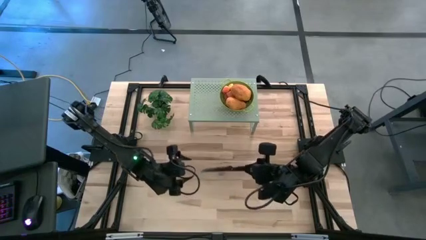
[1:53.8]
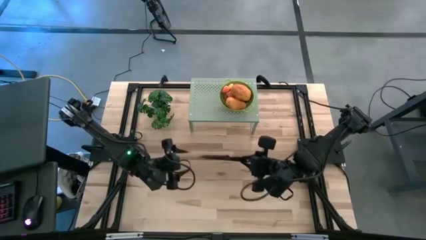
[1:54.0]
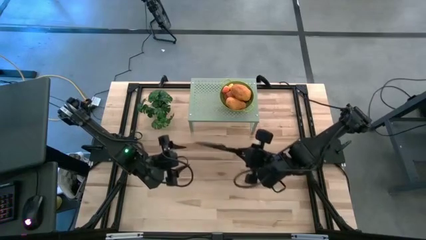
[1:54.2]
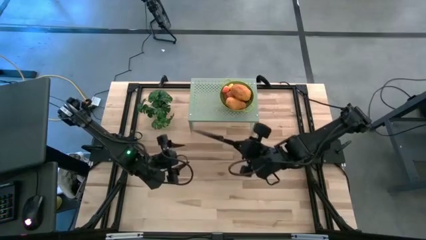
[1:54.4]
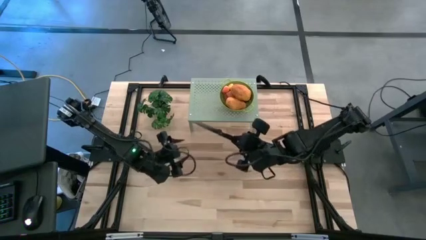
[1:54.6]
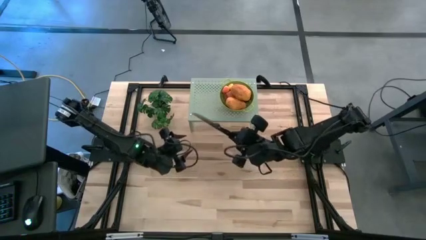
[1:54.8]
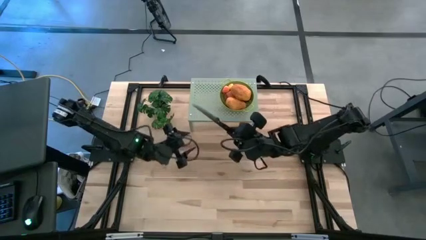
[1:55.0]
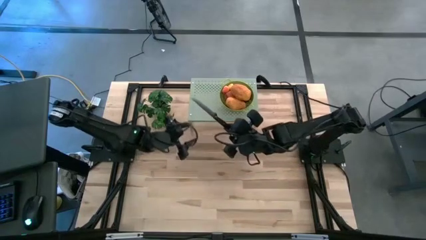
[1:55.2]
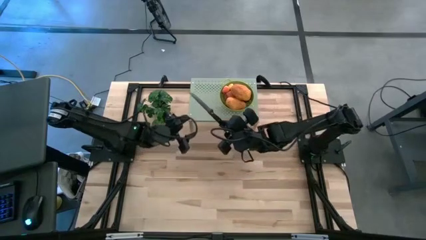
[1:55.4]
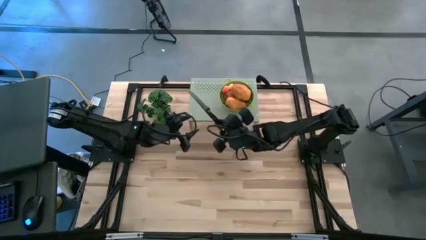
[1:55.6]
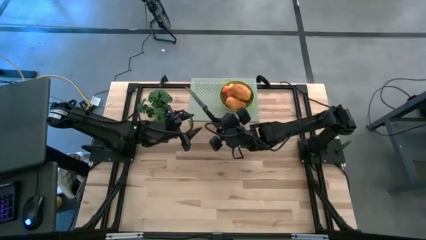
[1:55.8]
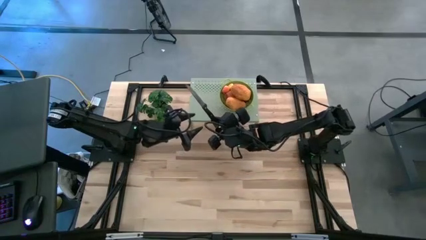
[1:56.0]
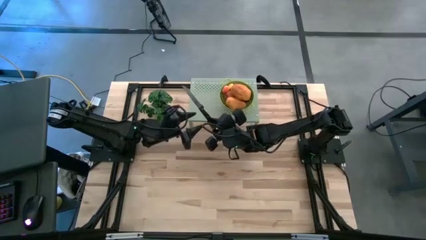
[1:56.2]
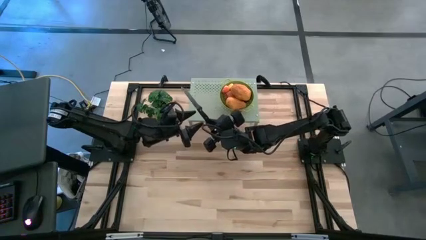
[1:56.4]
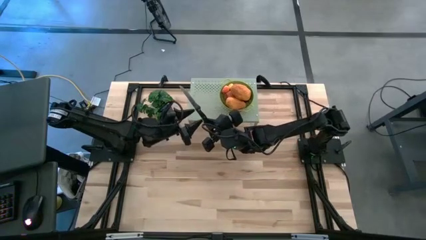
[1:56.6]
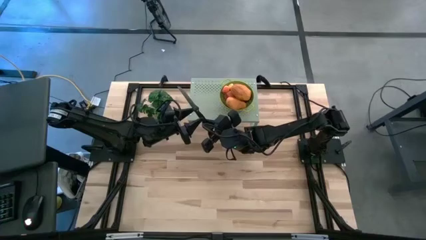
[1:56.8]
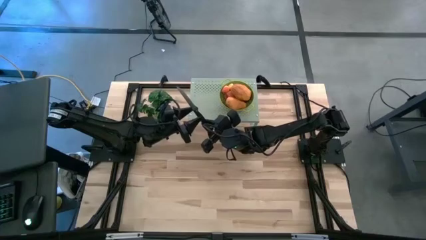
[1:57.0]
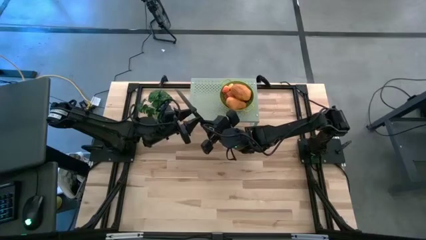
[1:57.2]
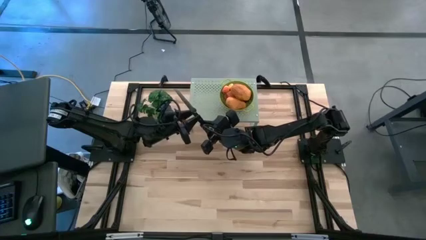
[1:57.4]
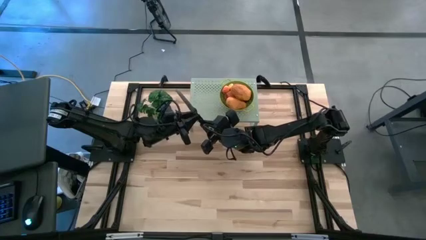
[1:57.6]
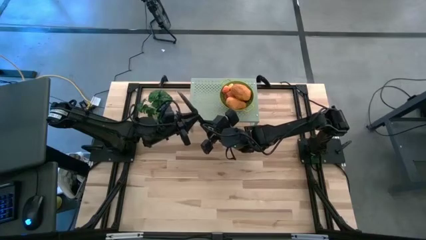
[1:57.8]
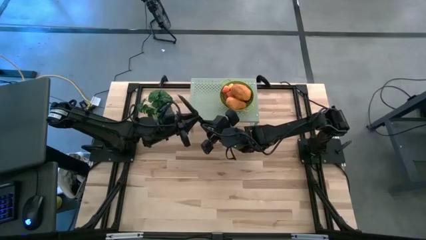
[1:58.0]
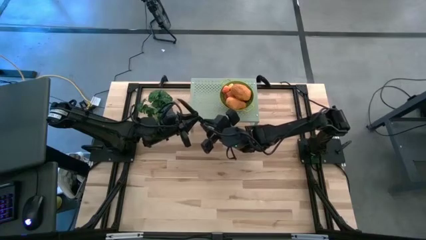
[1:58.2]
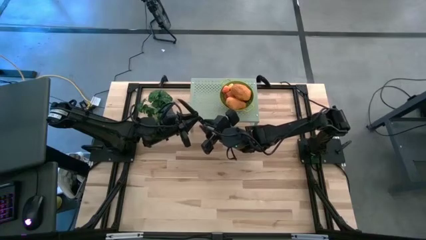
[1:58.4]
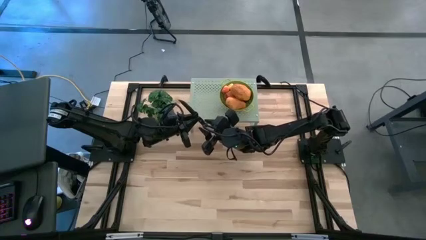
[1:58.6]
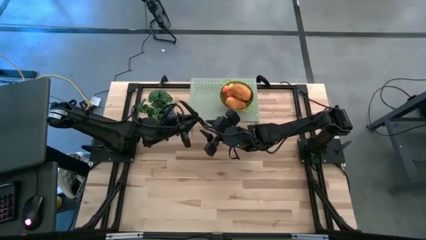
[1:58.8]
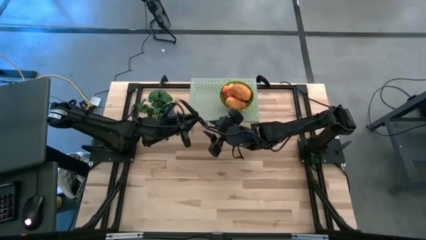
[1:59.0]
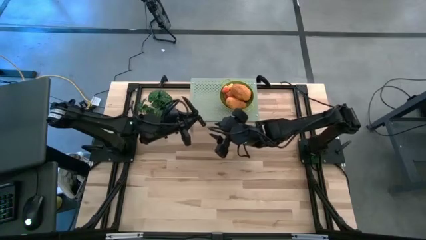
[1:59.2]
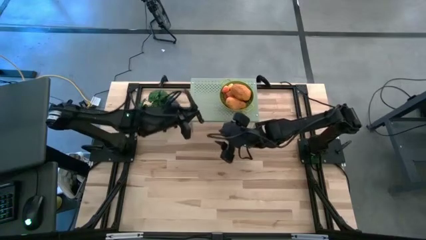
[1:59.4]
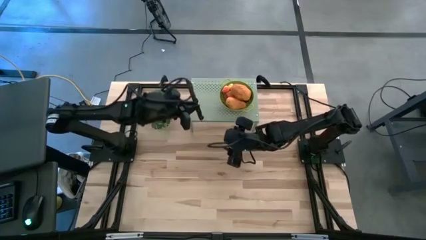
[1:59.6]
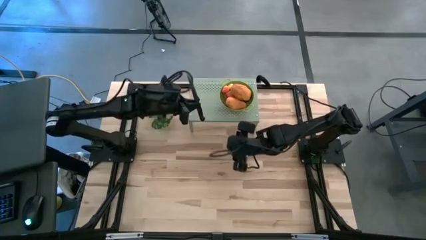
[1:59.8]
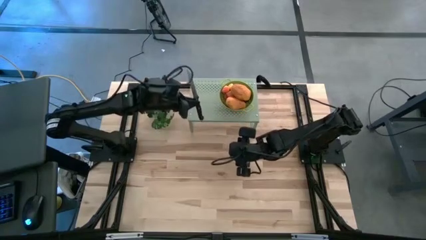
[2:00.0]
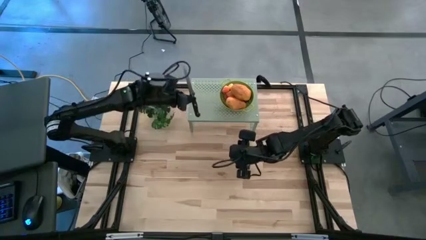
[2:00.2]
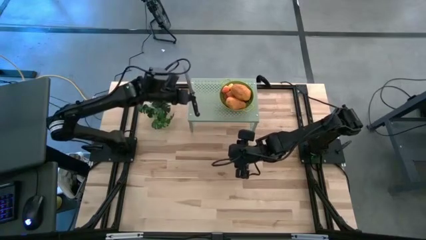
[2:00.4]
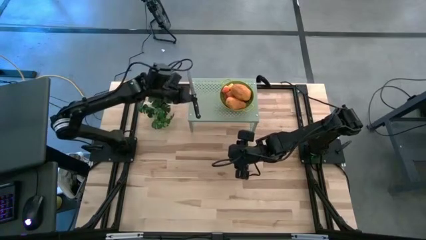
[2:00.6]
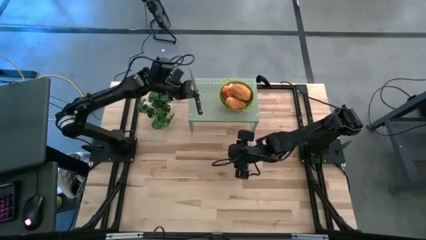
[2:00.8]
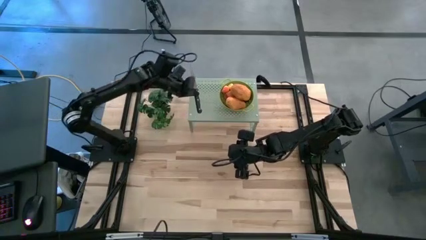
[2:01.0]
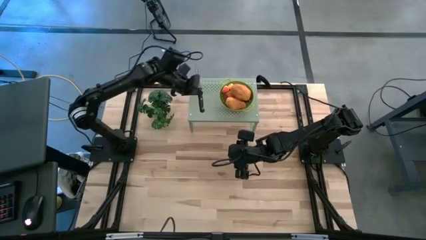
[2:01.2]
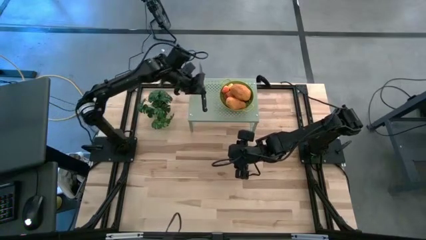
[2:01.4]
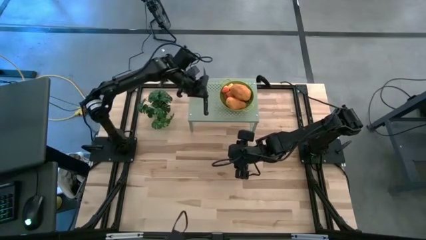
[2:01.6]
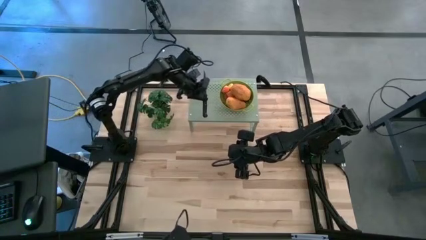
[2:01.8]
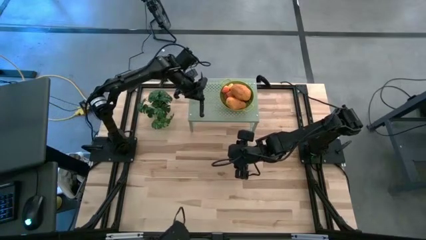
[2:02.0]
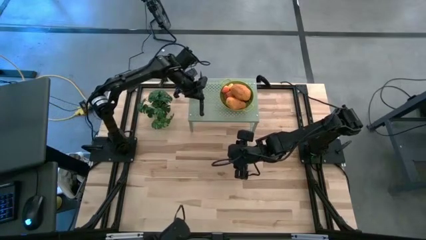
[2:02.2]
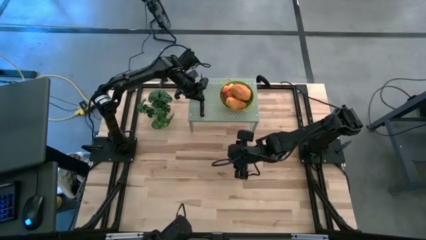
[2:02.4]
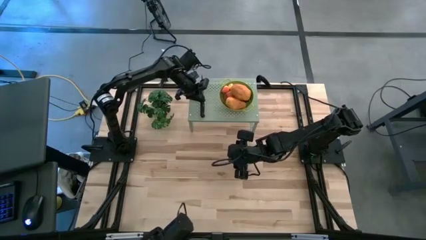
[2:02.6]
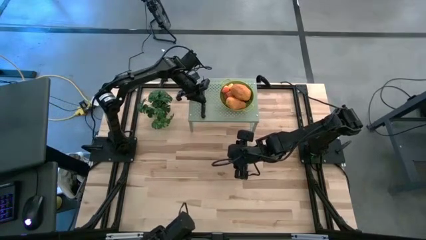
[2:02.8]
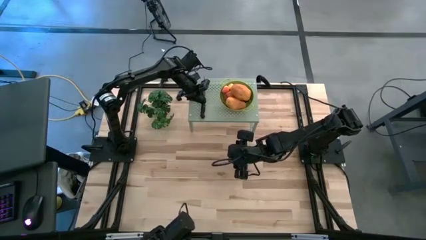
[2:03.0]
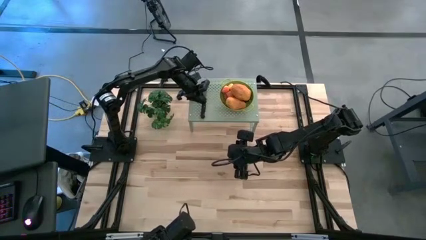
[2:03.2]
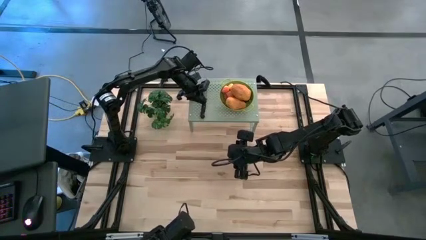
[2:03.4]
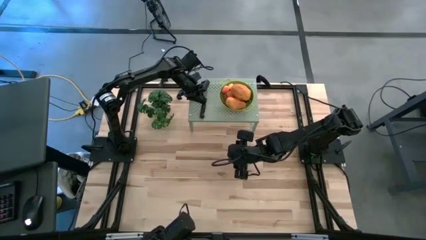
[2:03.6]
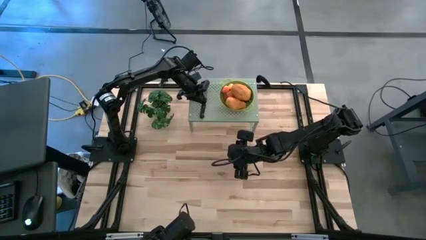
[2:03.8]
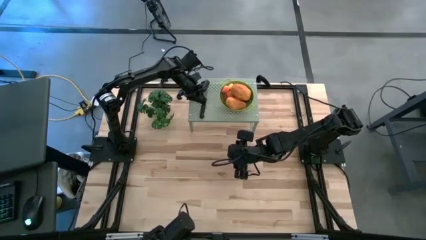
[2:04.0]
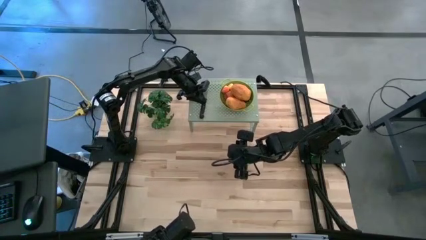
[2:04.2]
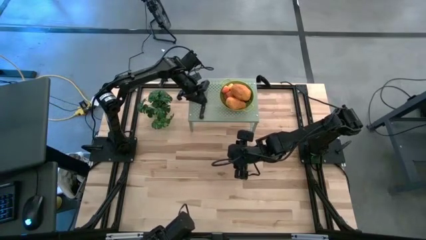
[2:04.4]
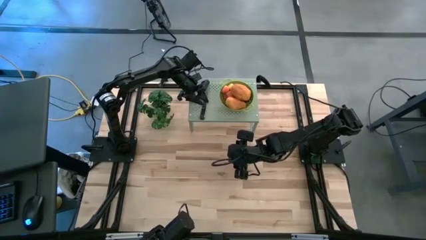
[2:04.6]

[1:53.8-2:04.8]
Task: Pick & Place Fruit
Put the knife on the shelf
